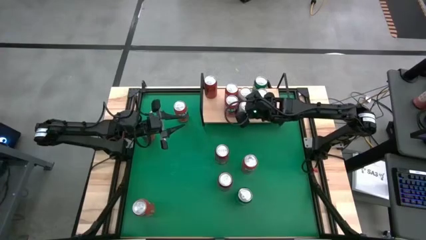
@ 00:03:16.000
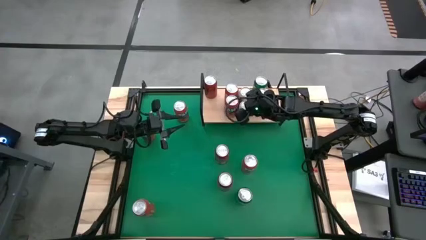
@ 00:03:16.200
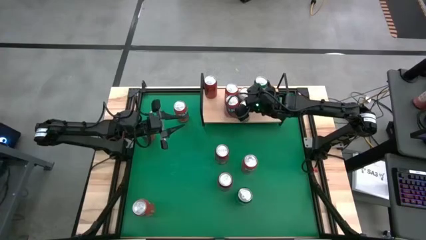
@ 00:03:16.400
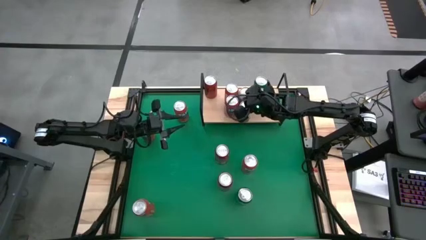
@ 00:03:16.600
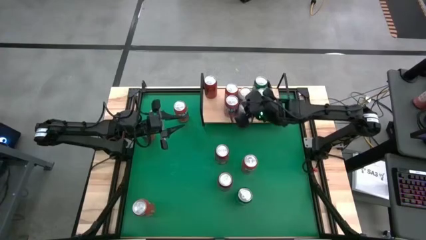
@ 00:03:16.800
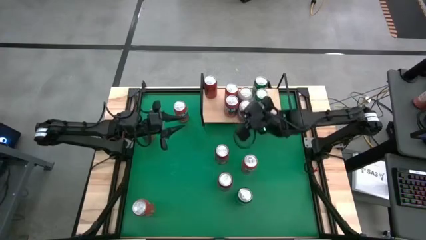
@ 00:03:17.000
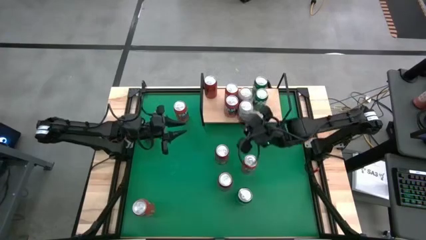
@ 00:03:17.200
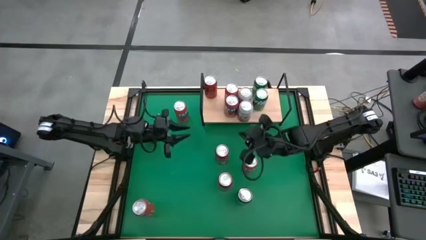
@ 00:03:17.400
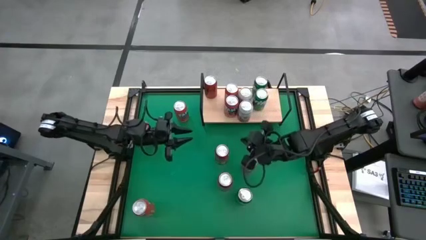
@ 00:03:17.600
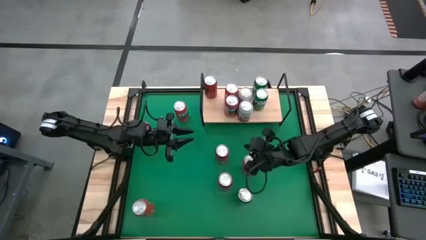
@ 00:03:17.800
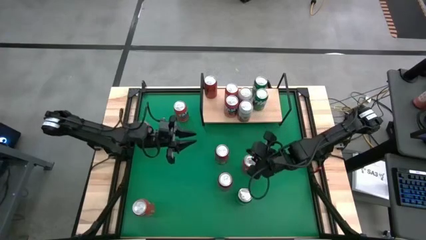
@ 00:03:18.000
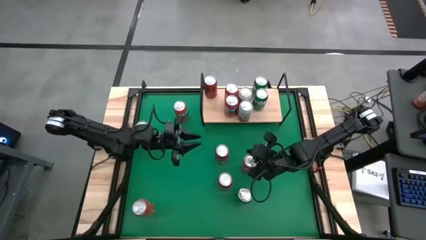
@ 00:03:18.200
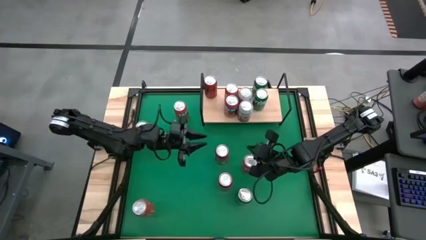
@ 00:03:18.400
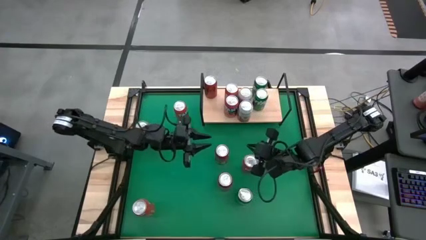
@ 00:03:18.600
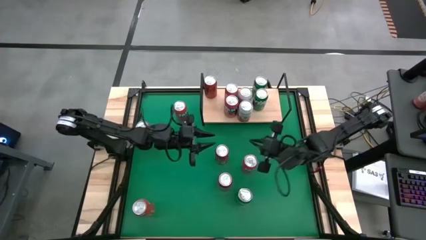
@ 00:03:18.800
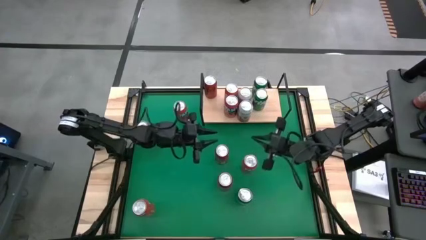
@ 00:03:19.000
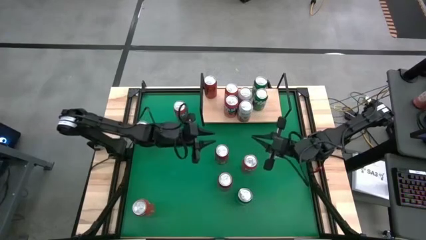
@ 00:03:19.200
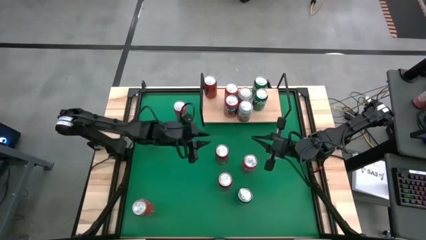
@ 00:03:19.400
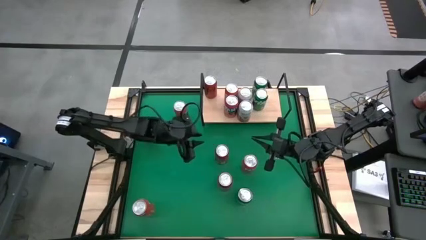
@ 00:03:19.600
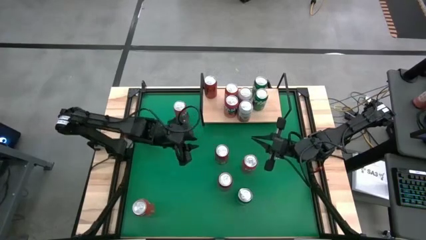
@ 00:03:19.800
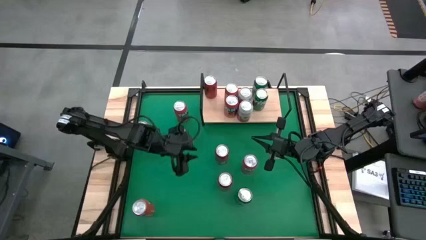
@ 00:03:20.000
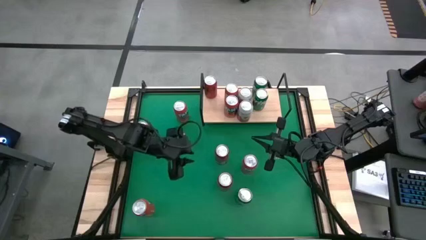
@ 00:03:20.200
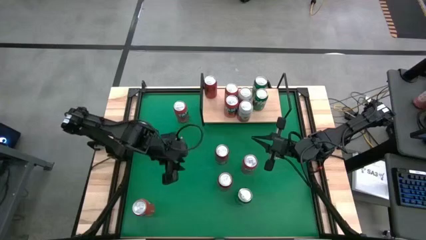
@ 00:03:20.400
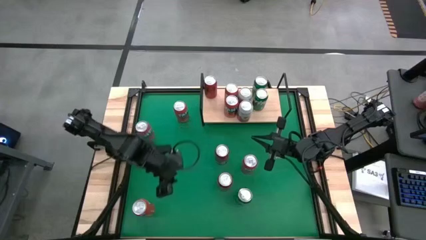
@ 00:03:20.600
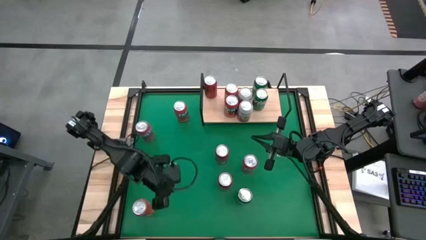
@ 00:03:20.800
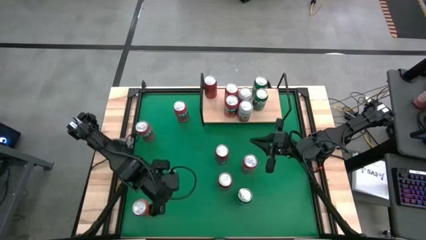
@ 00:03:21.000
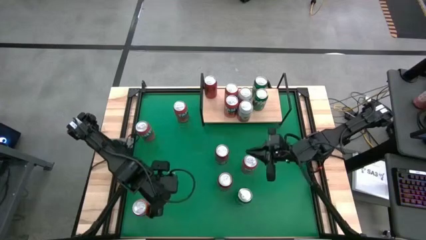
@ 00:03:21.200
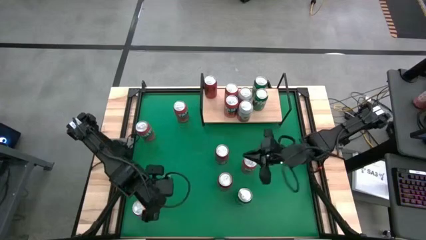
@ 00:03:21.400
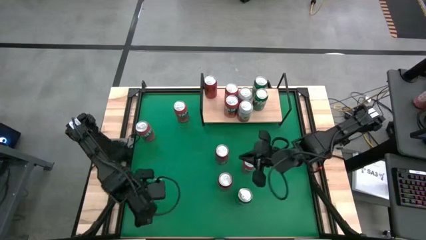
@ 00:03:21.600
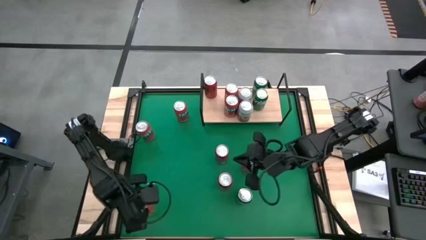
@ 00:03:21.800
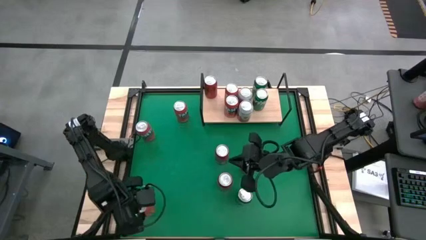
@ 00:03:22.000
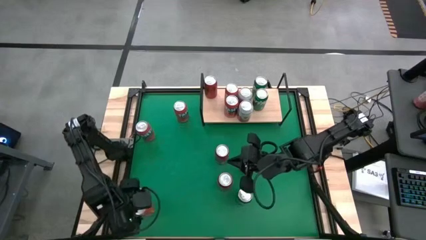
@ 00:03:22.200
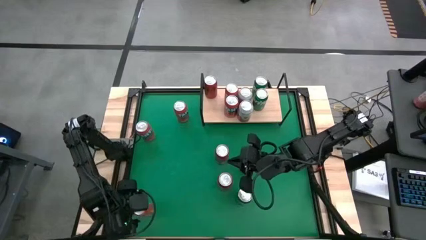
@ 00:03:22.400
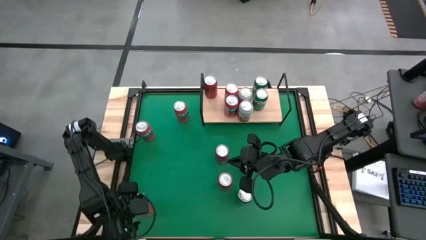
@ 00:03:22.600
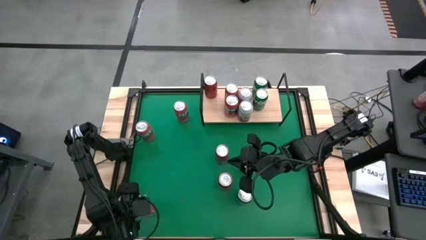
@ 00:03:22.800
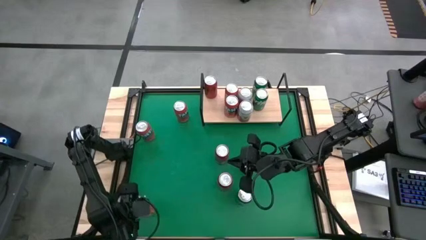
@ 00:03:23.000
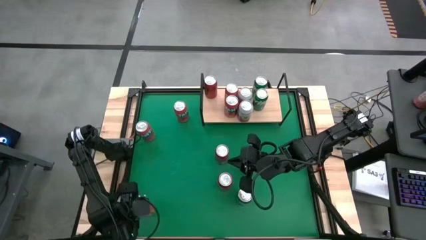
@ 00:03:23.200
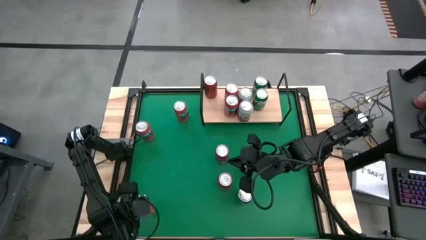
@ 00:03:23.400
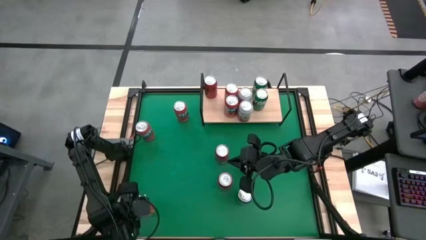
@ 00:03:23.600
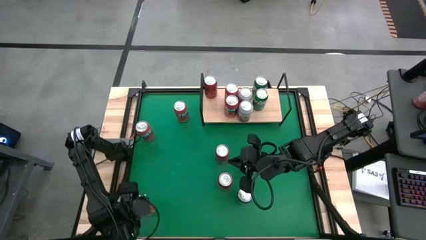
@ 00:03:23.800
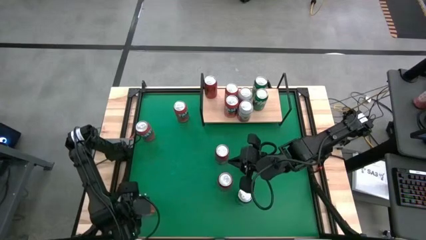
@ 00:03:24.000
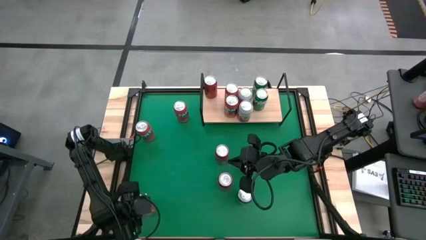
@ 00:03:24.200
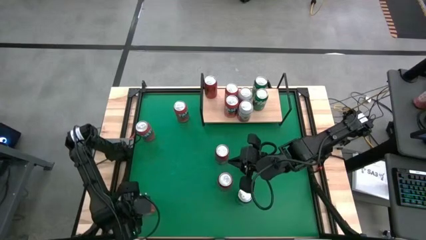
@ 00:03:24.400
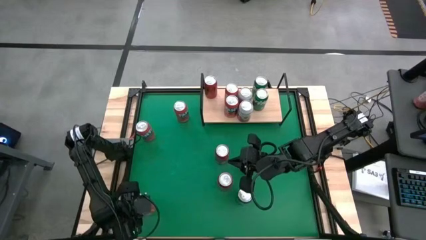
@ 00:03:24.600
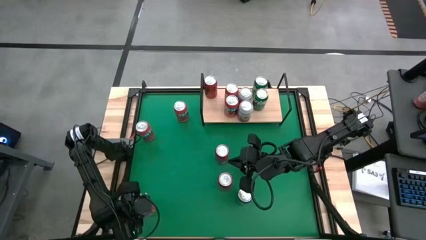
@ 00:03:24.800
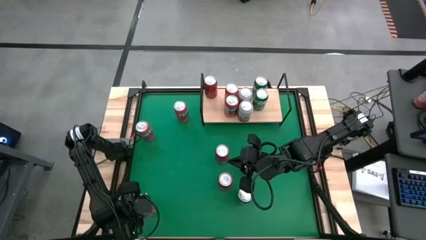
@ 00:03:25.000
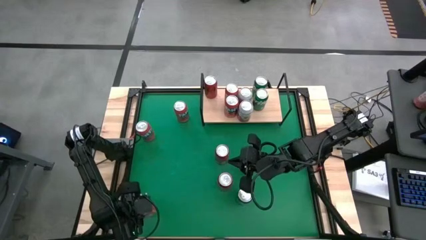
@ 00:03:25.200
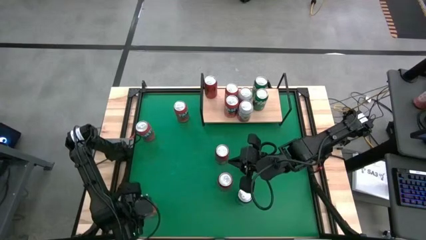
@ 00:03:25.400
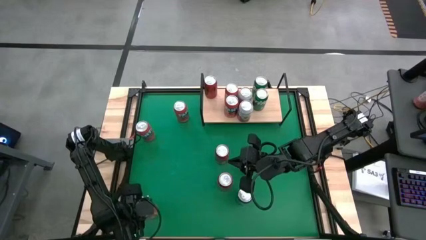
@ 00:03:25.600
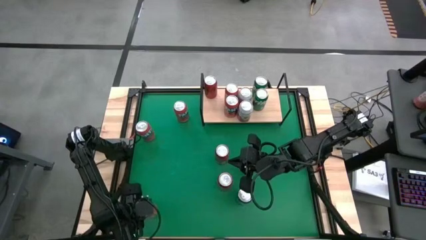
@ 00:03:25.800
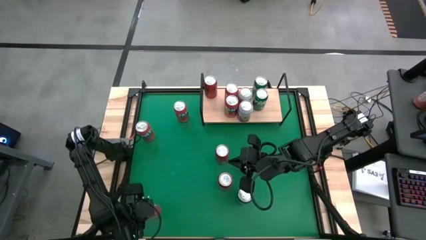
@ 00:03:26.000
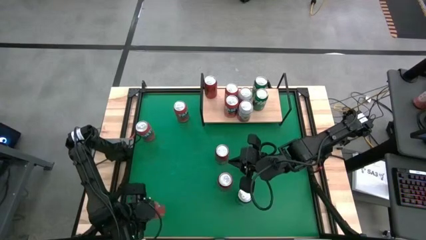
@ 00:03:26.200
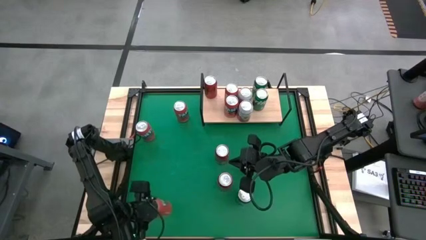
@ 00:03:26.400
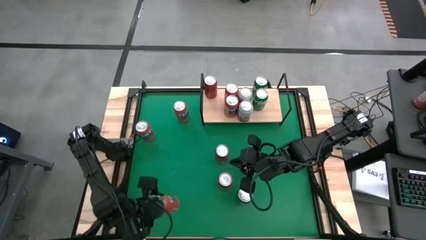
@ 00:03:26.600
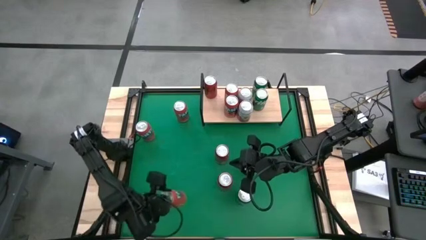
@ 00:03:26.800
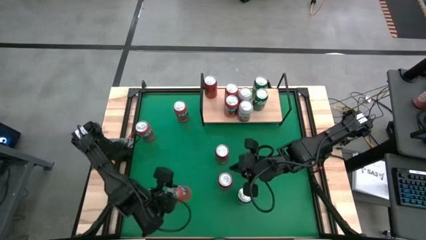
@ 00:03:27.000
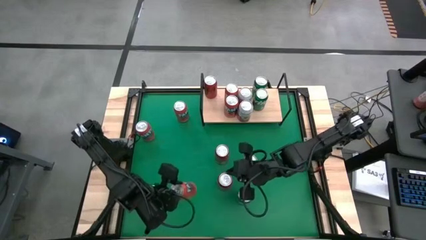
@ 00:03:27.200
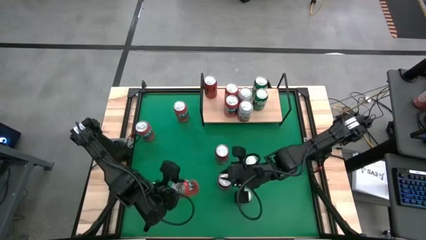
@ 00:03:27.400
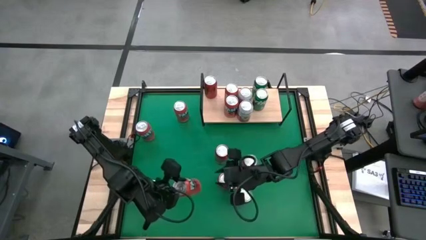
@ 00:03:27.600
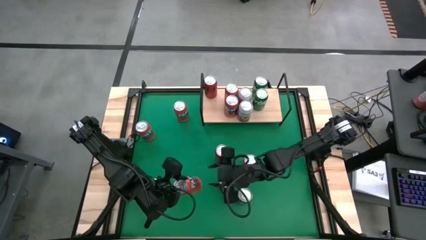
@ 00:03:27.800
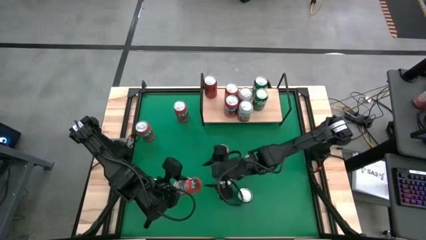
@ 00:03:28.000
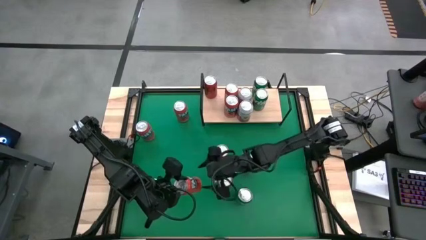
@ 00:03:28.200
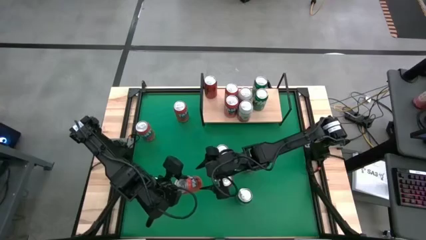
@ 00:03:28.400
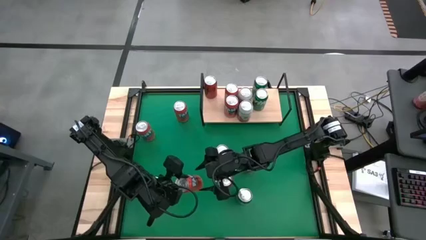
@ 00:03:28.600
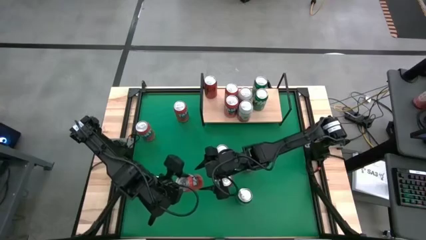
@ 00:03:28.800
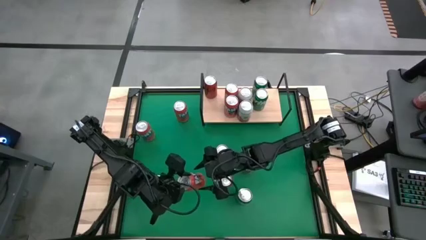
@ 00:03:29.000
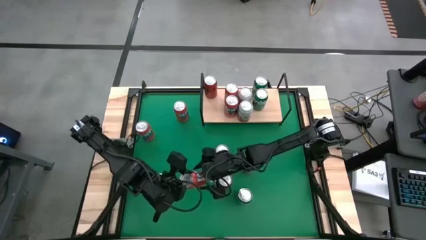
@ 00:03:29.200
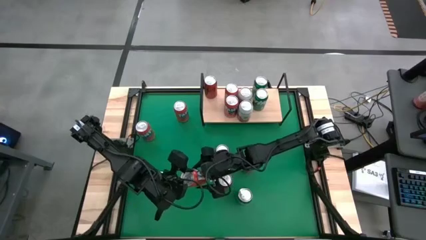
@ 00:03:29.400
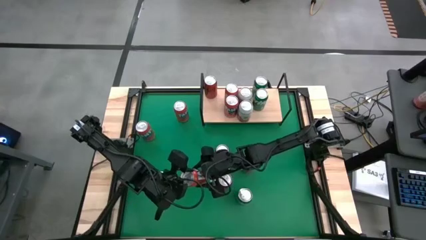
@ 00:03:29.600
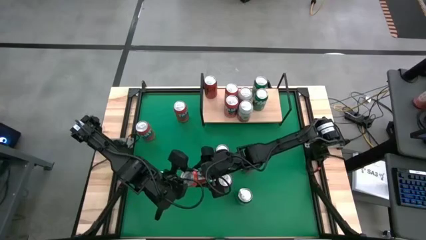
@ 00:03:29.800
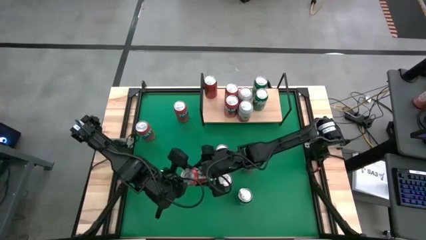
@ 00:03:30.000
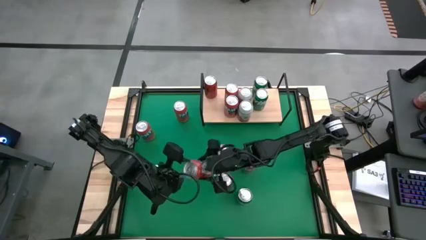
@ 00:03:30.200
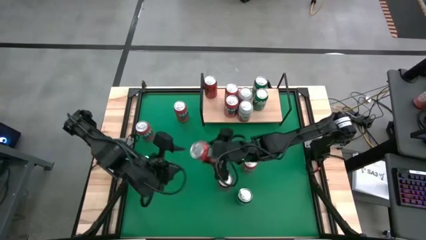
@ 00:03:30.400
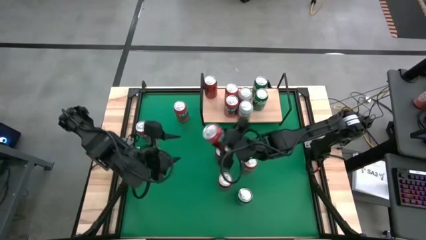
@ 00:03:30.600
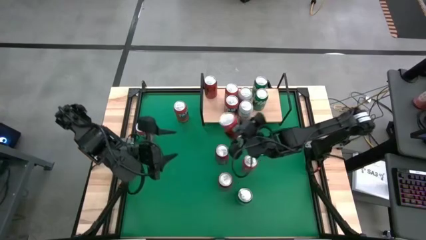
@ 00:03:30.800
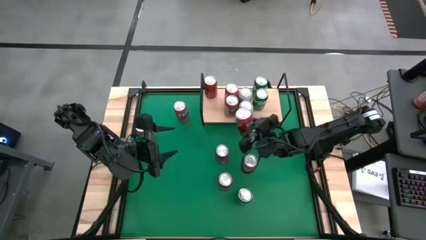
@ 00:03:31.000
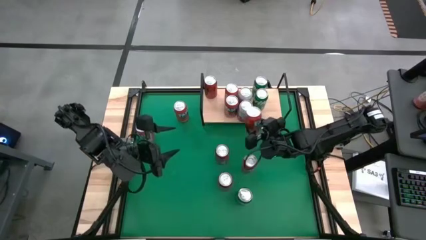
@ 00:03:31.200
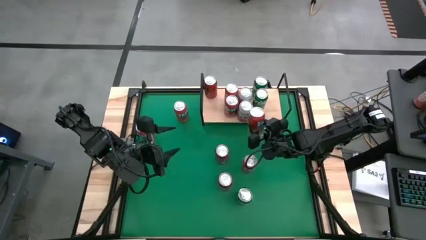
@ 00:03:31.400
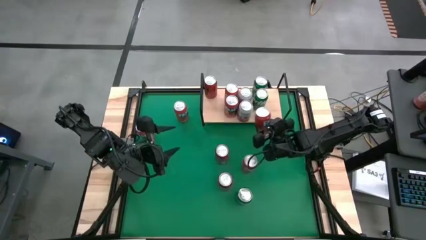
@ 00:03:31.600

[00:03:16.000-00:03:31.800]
Task: Place canned beverage on shelf
Put the red soda can on the shelf
